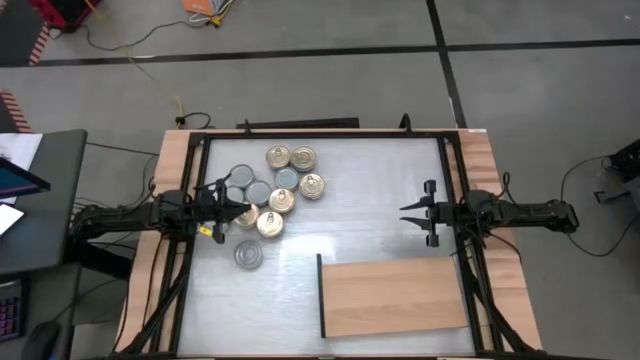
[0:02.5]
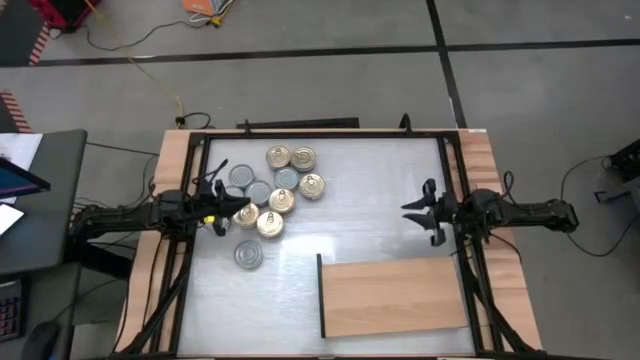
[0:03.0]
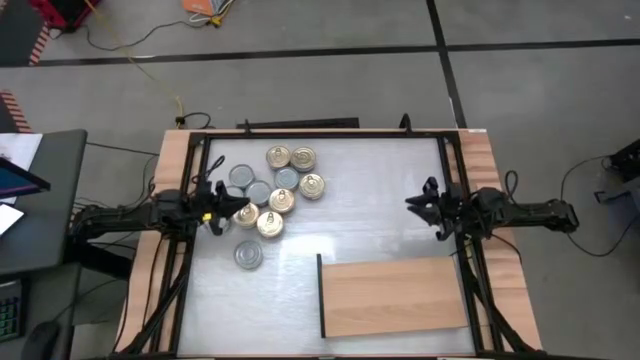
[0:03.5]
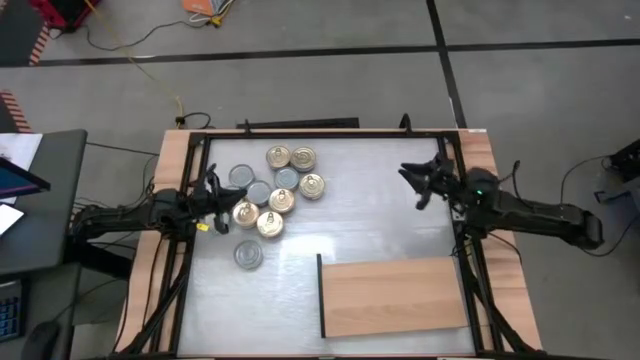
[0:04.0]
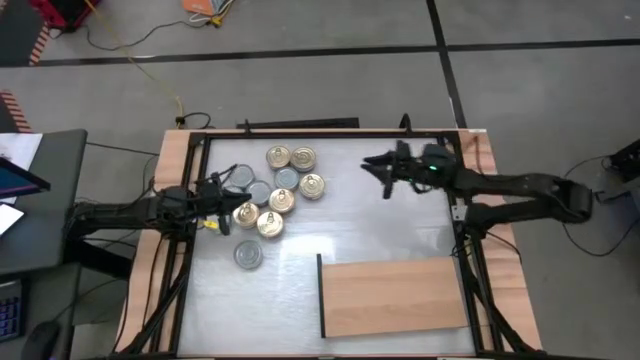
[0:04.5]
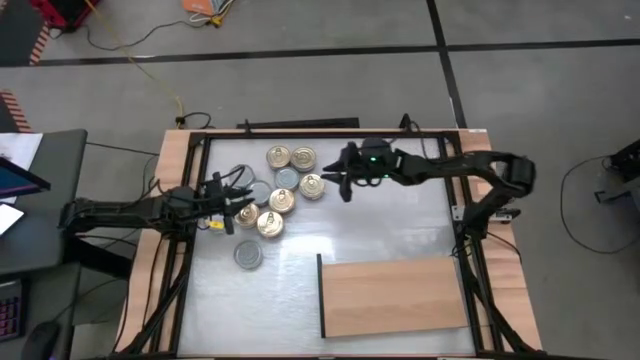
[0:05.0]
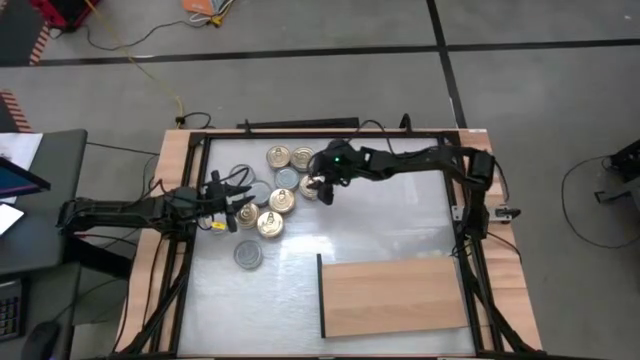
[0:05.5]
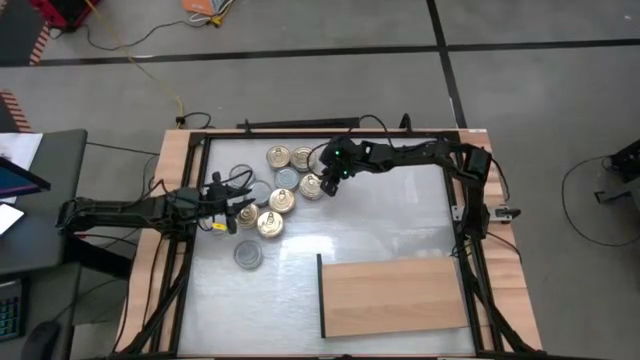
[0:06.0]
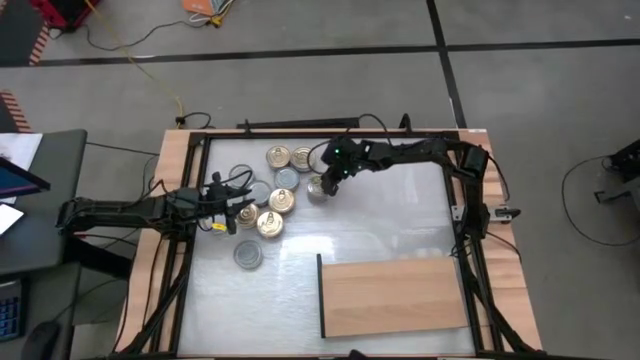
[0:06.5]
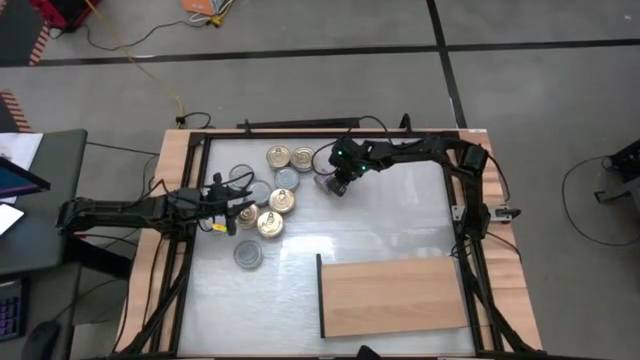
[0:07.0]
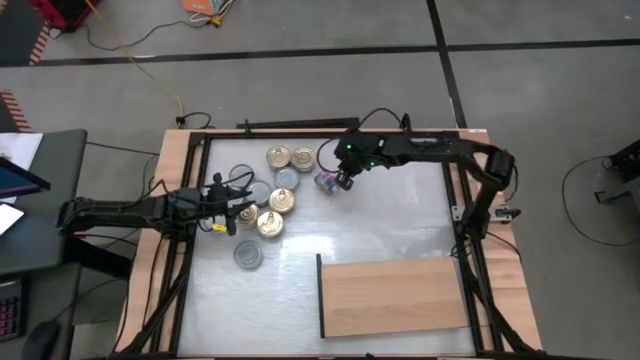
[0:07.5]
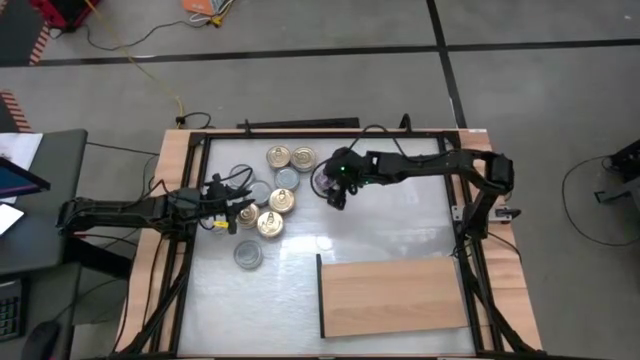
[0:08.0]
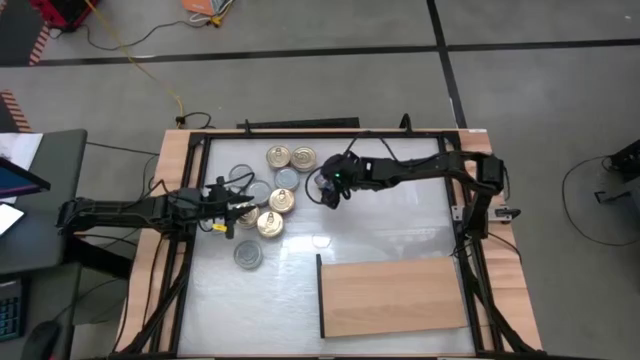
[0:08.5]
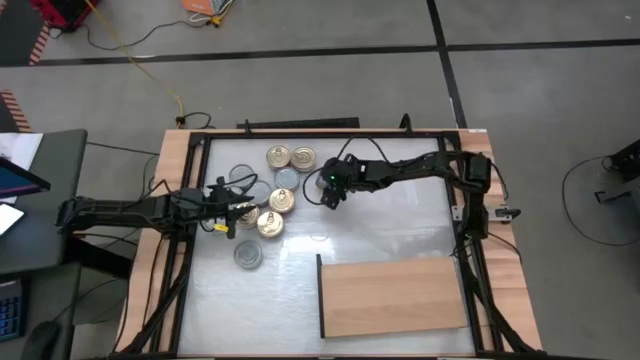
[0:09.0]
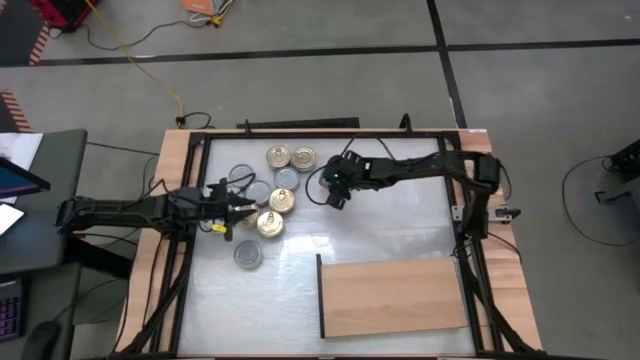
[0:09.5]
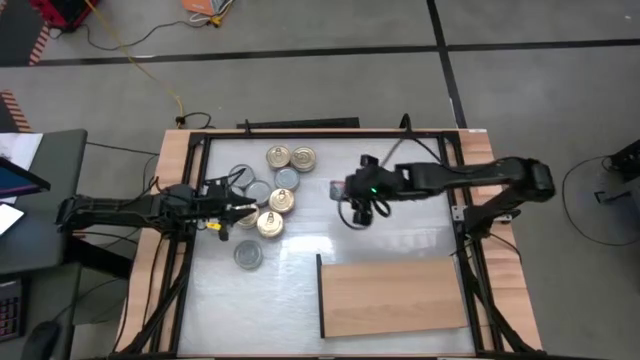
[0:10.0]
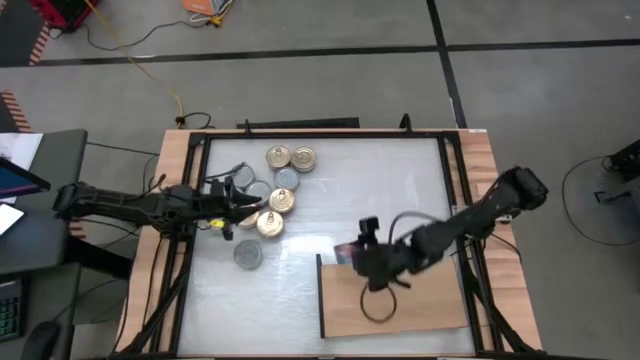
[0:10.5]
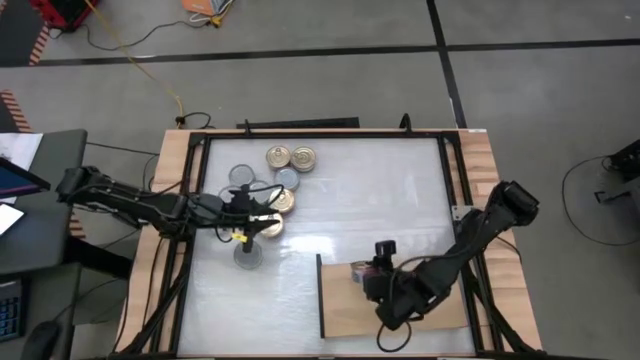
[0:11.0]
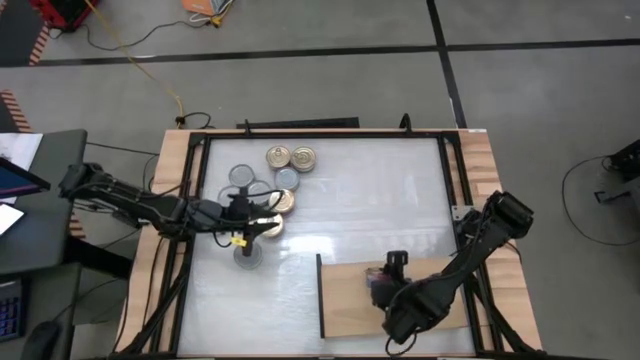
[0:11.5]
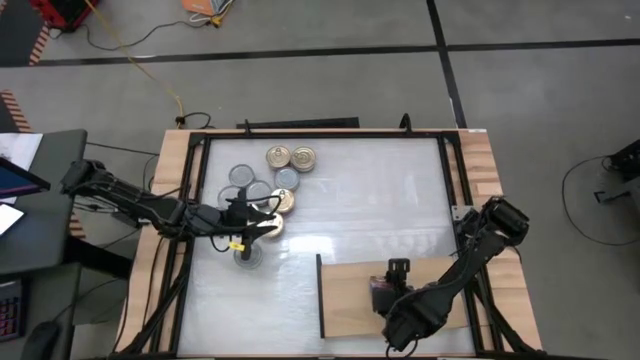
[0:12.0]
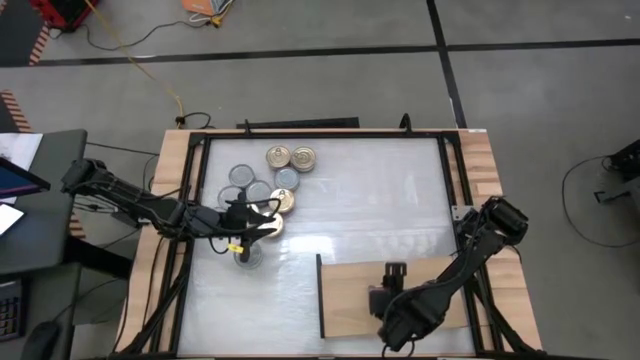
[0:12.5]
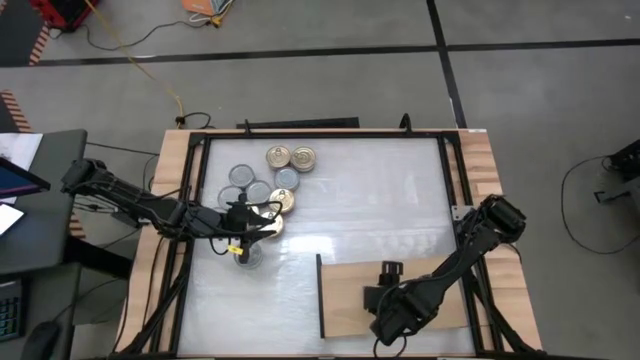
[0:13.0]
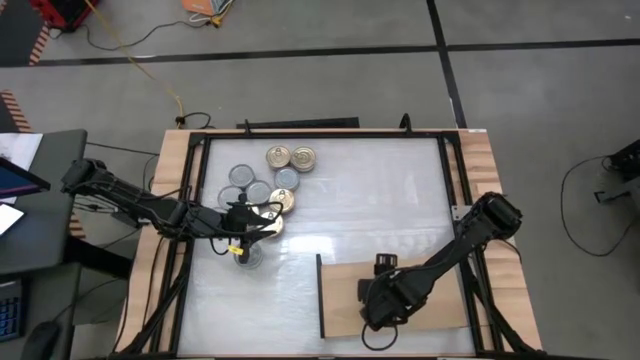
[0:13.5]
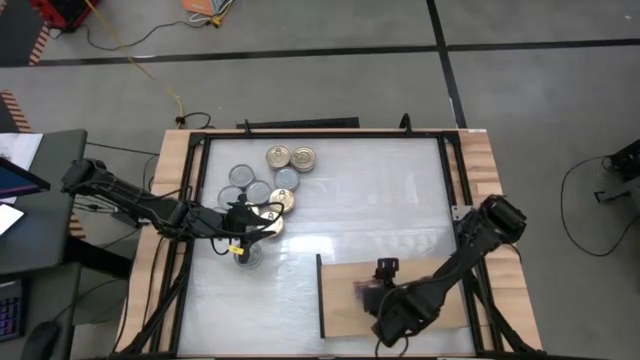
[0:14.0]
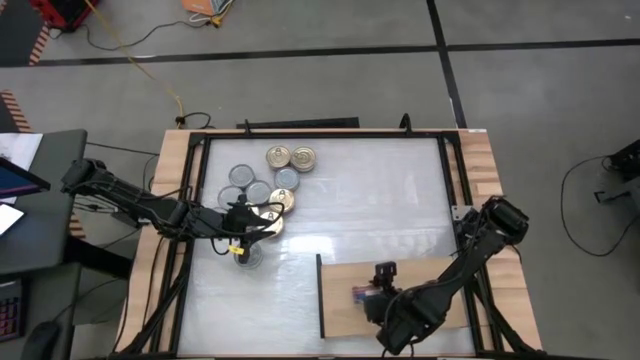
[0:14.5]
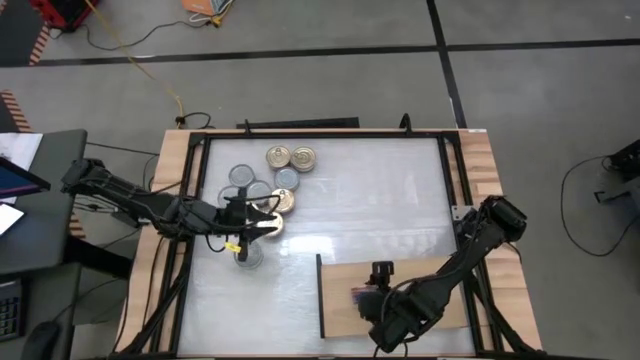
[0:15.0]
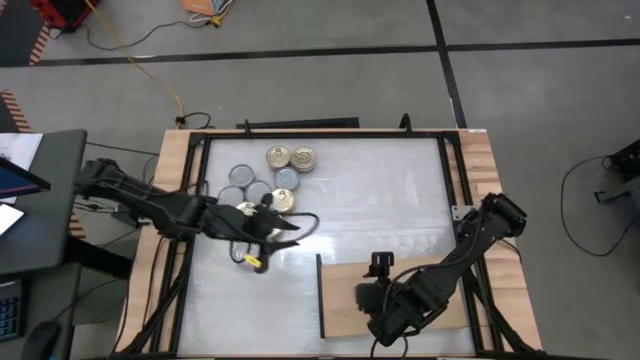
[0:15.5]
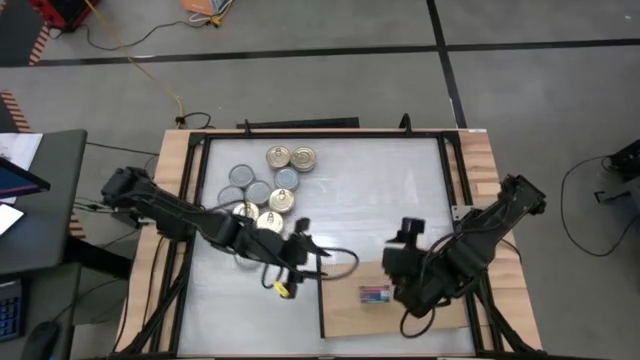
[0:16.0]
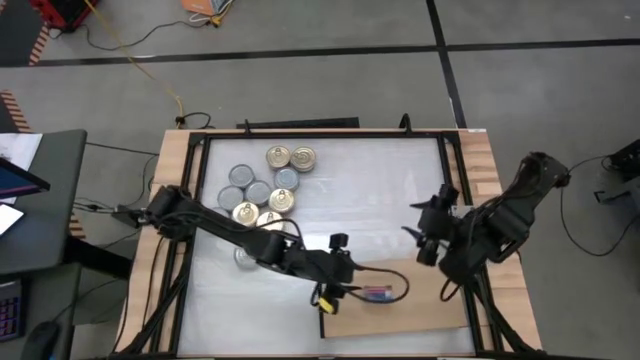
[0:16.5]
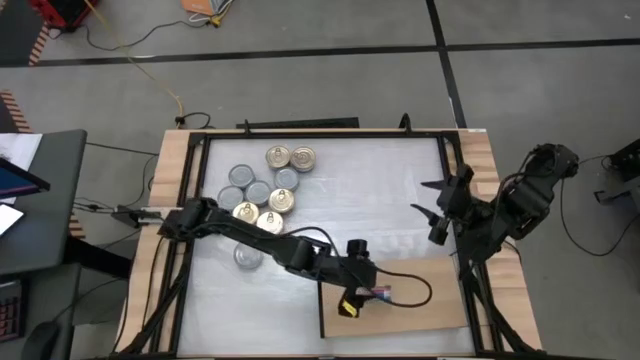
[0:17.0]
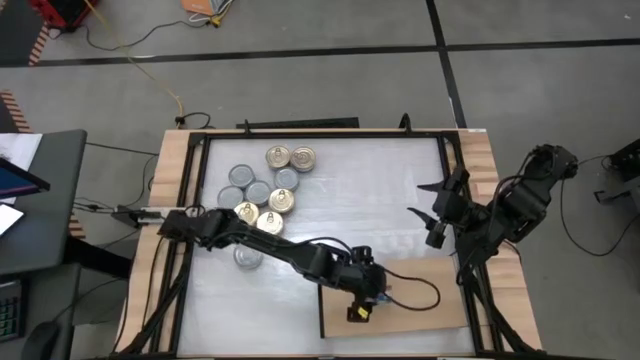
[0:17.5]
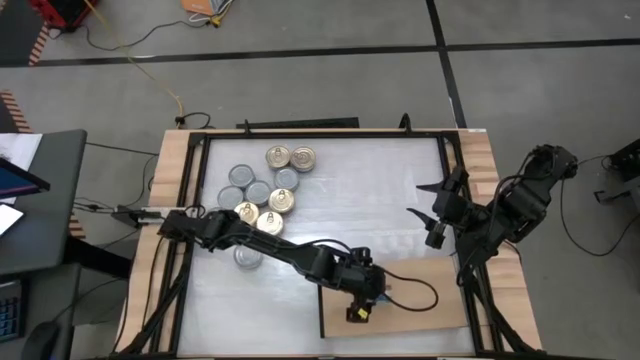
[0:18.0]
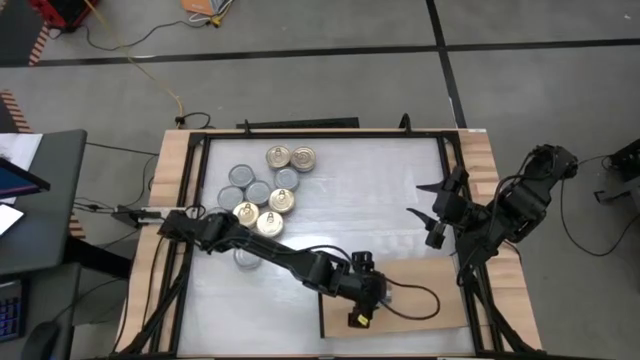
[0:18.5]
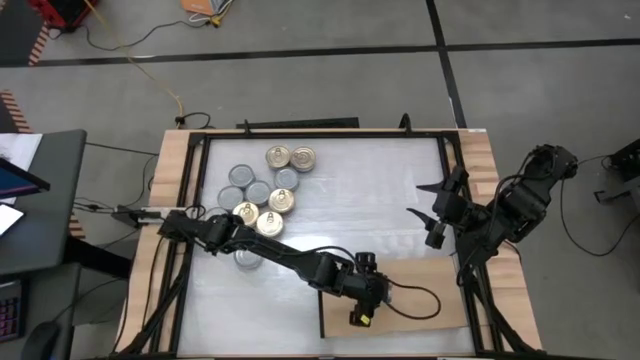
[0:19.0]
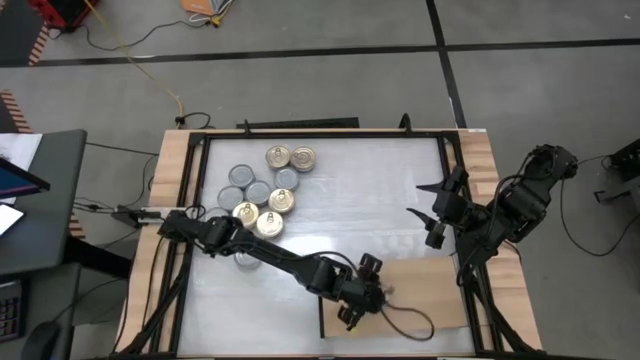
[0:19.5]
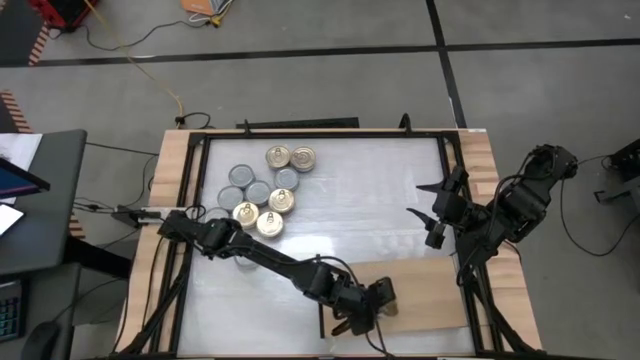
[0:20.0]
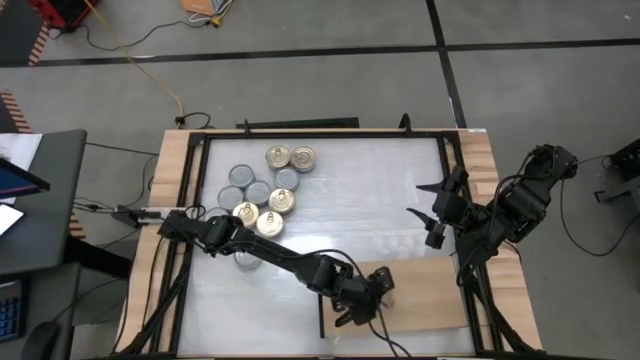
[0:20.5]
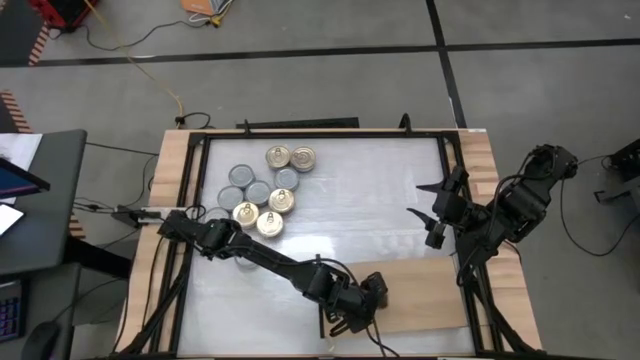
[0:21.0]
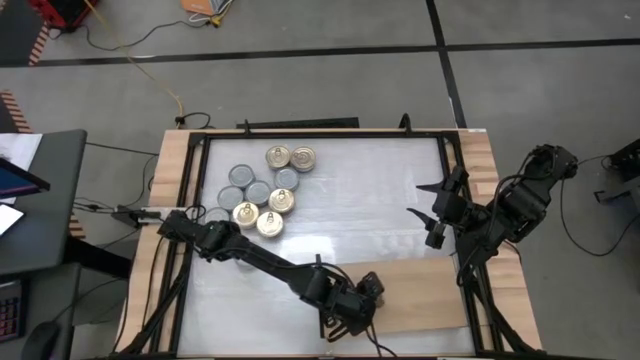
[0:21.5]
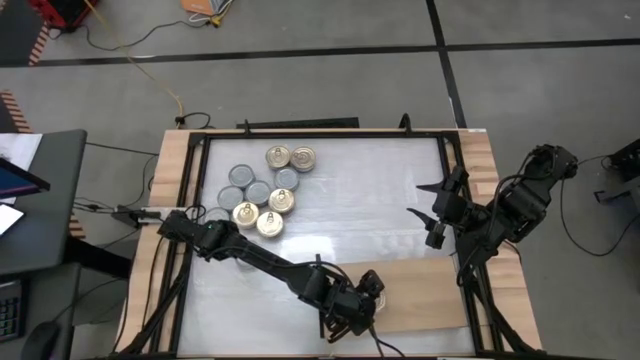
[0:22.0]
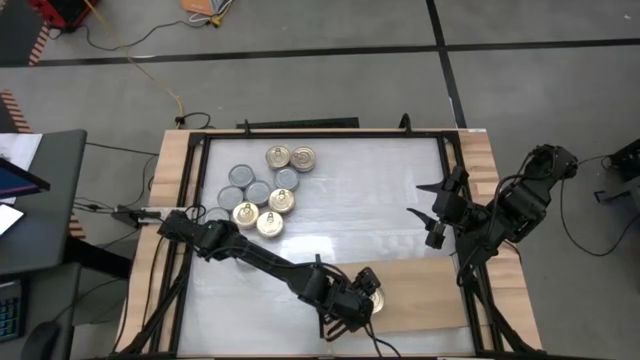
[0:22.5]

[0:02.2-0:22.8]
Task: Stack canned seafood by type on shelf
Put the blue pink tuna can on the shelf
